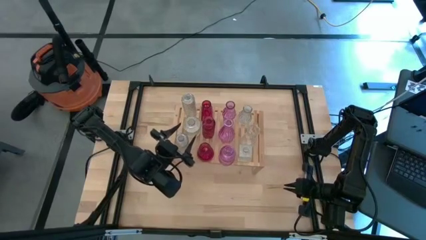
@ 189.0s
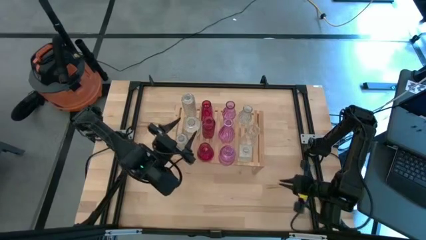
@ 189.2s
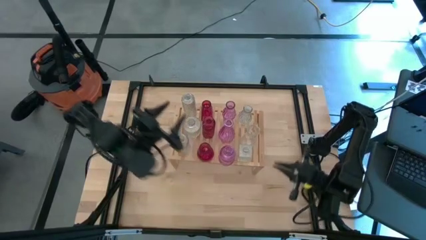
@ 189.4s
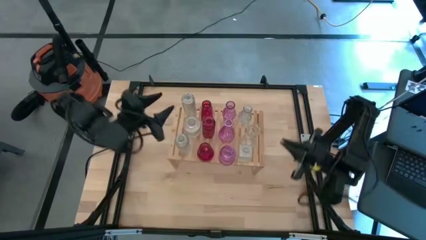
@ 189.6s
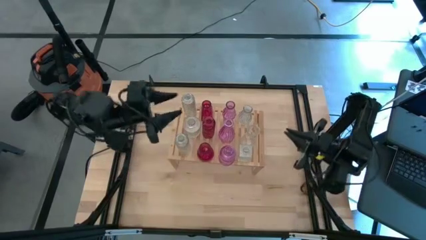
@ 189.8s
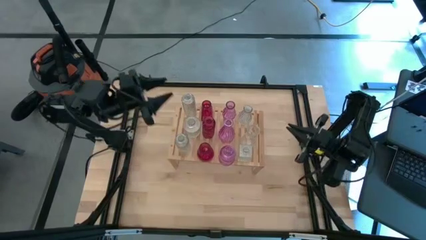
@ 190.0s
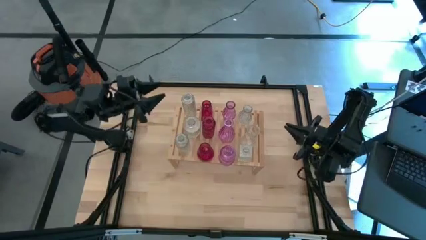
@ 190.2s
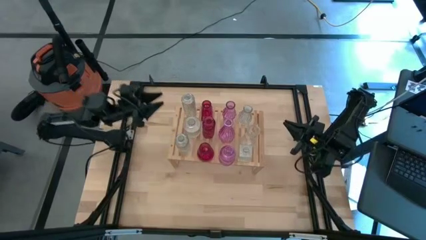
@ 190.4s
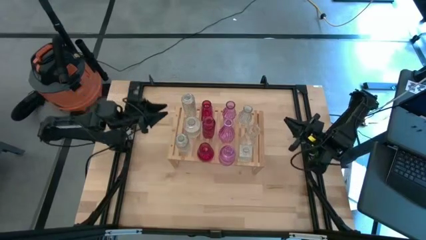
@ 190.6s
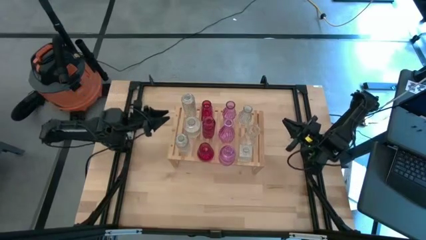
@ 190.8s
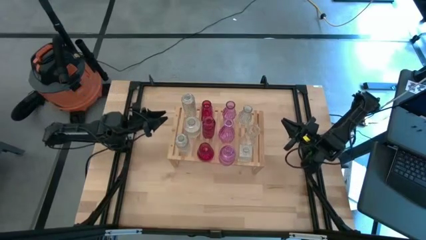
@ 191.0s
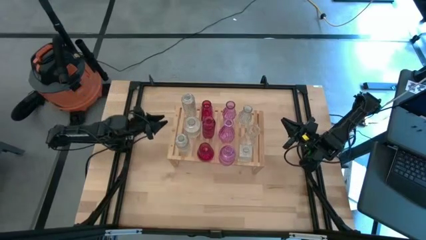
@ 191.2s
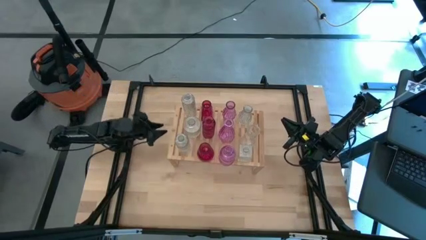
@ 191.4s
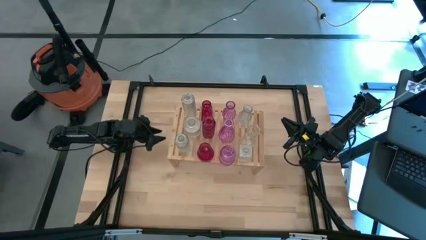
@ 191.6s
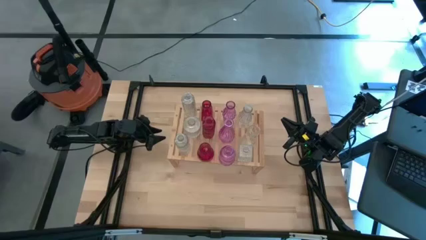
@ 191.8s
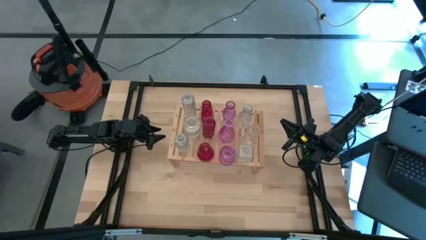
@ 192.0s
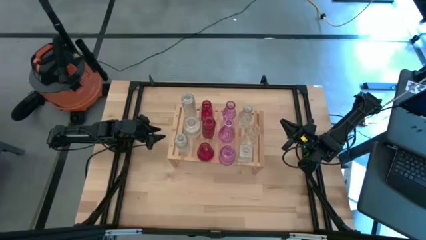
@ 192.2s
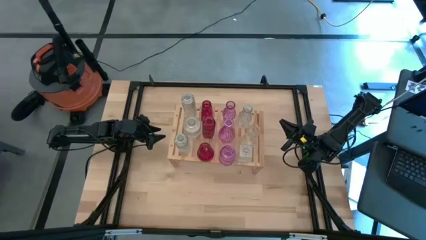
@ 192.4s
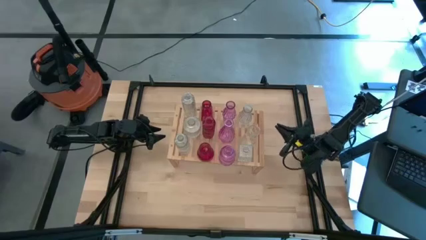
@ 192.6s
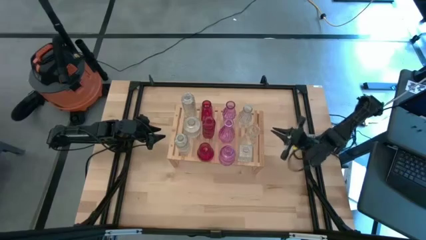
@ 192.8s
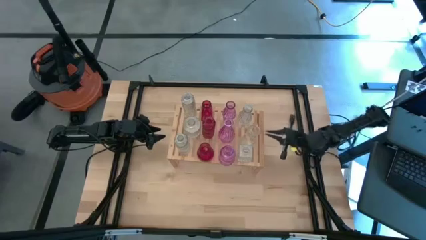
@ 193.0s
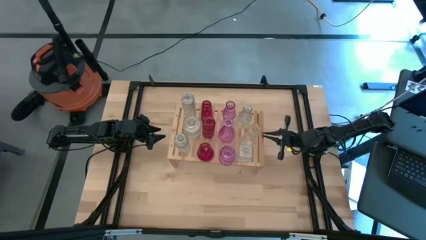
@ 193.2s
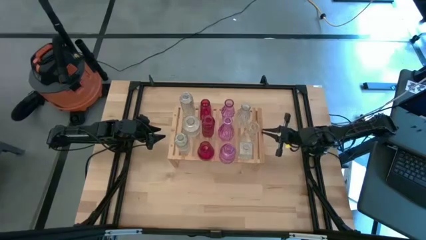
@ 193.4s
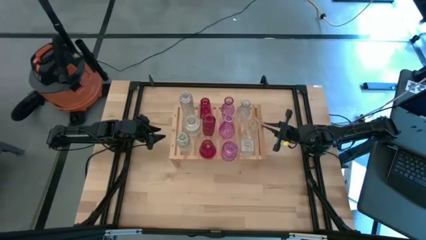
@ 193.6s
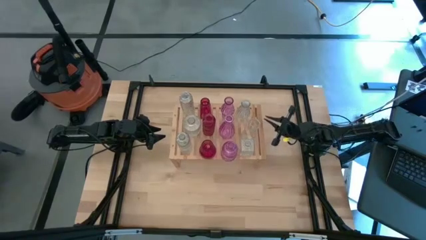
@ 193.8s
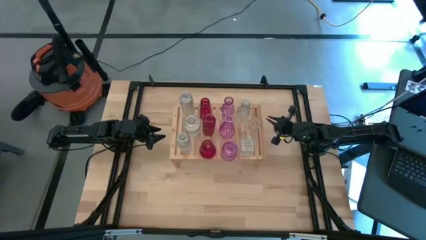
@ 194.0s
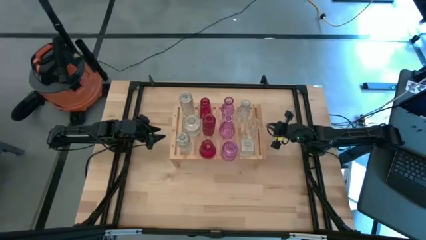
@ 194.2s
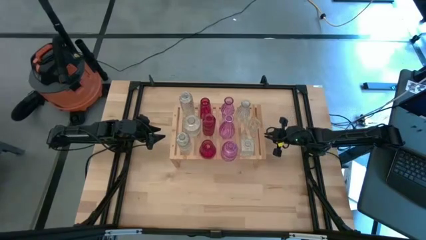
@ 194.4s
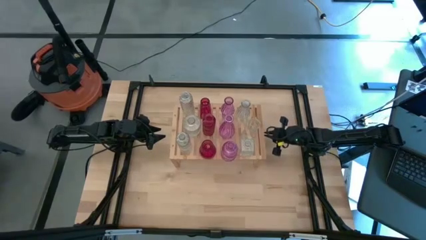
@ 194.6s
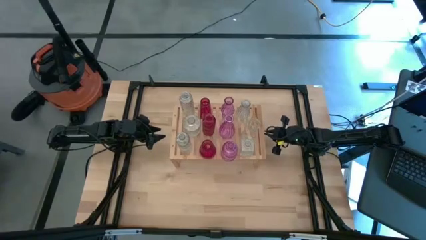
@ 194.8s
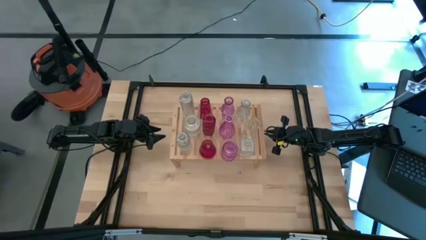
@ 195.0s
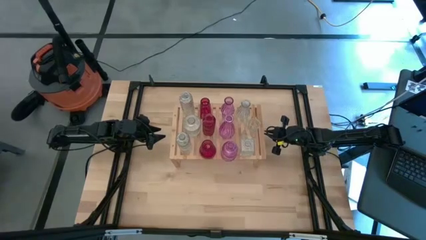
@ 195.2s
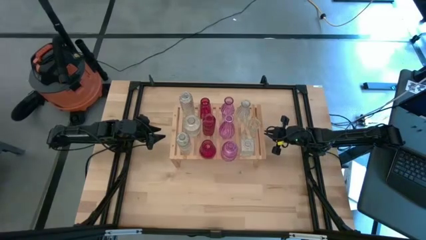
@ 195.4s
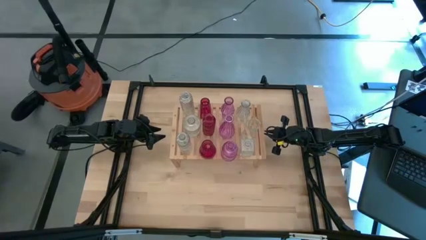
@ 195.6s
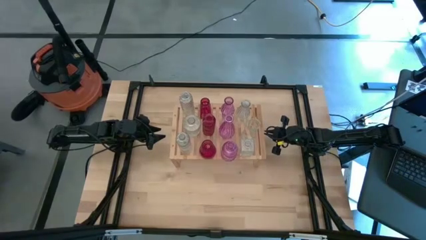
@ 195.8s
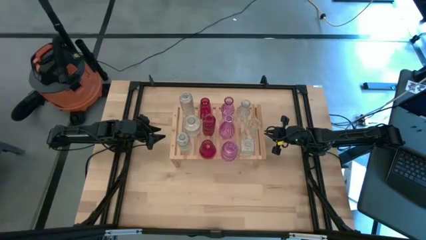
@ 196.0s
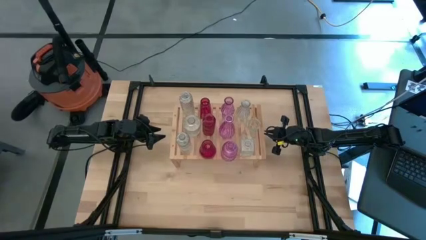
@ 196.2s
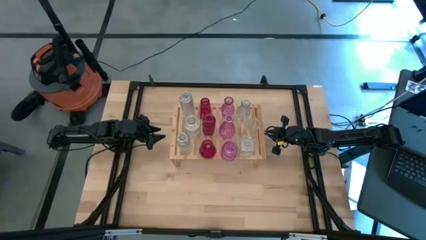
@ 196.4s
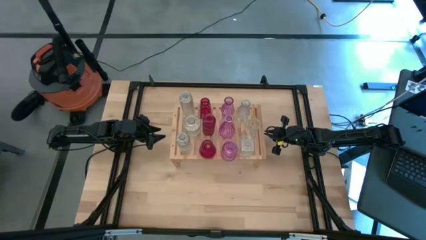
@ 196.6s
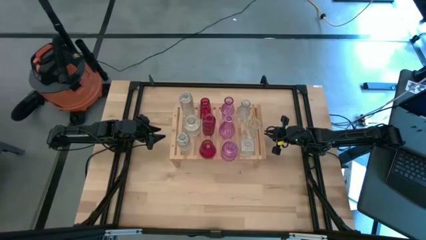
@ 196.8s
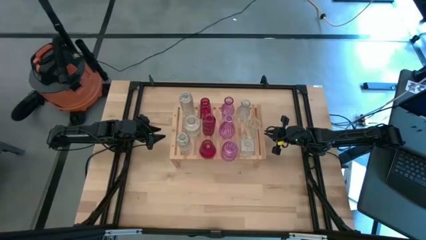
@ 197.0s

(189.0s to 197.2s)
Task: sort vases onto shelf
Return to Home Position

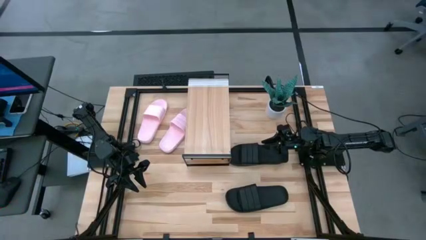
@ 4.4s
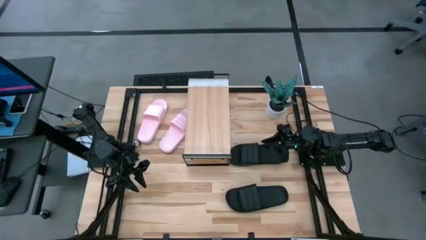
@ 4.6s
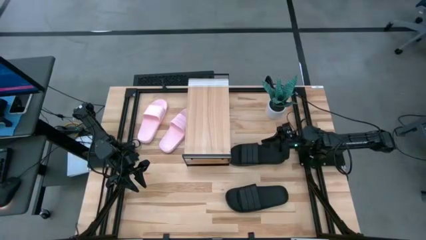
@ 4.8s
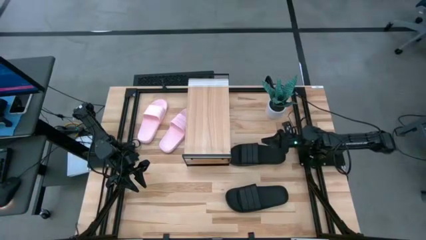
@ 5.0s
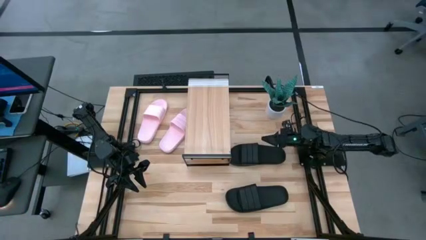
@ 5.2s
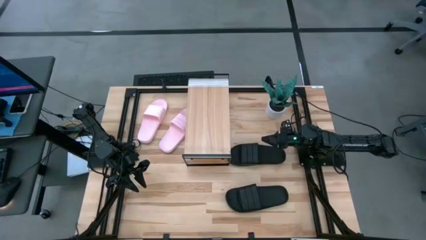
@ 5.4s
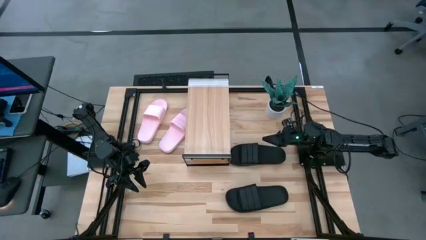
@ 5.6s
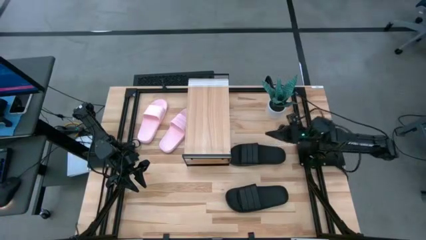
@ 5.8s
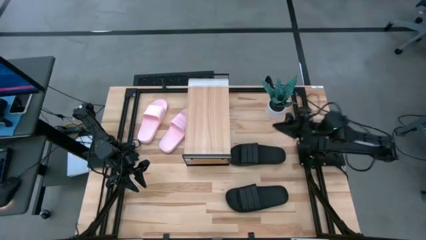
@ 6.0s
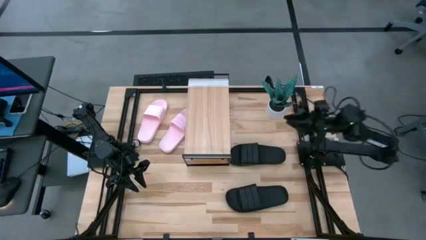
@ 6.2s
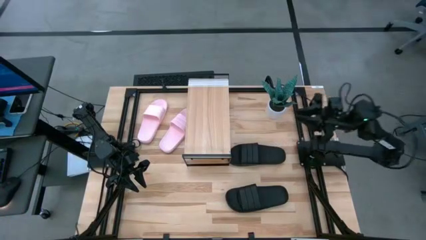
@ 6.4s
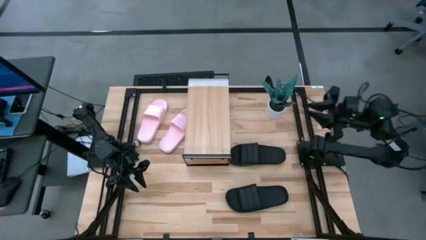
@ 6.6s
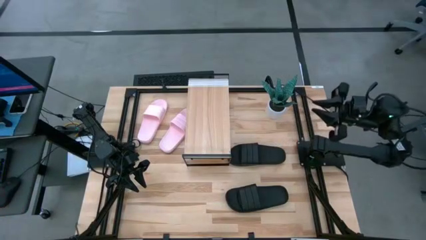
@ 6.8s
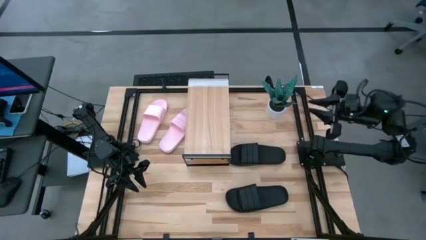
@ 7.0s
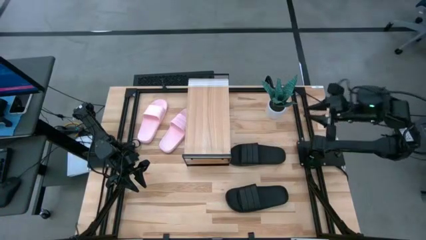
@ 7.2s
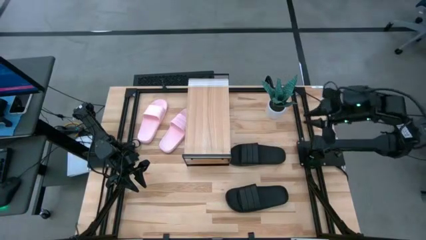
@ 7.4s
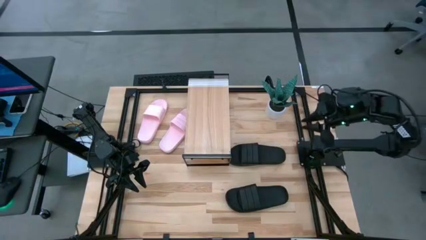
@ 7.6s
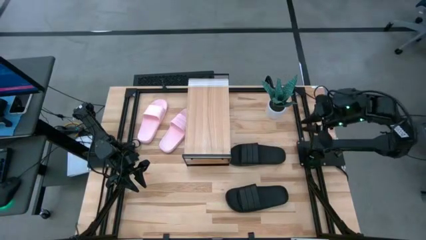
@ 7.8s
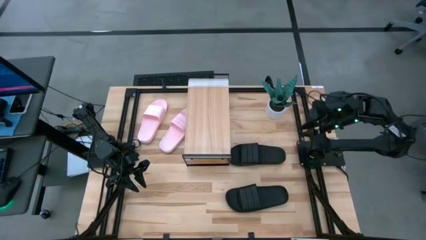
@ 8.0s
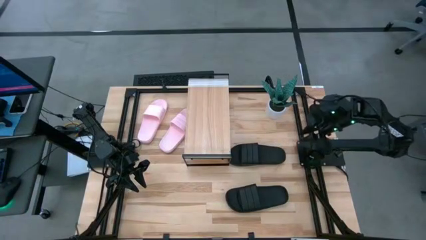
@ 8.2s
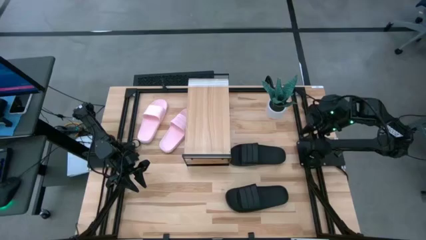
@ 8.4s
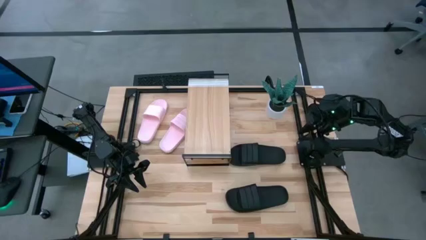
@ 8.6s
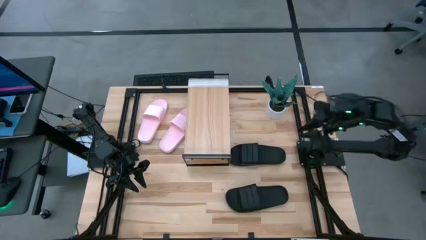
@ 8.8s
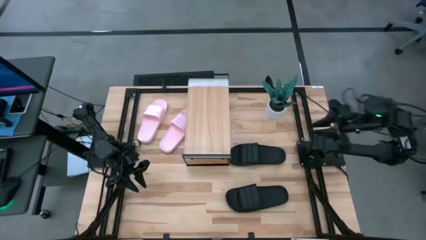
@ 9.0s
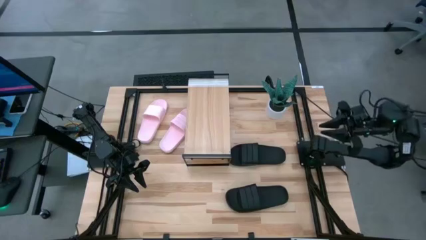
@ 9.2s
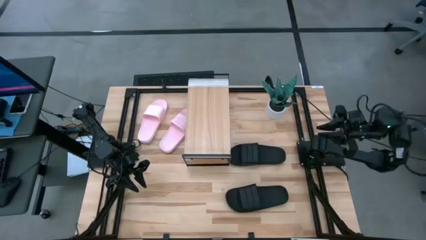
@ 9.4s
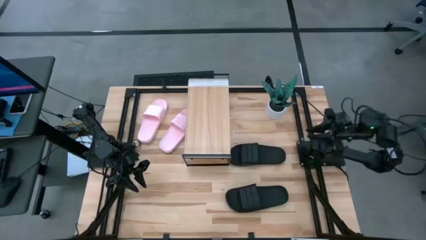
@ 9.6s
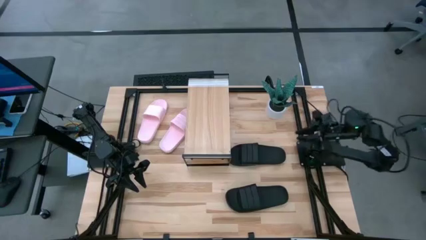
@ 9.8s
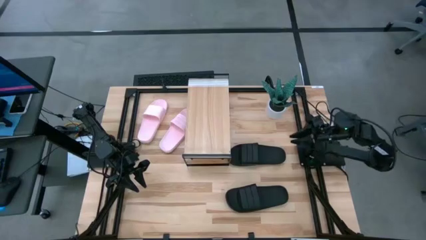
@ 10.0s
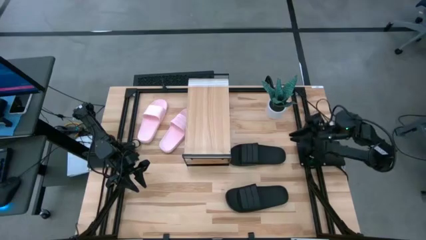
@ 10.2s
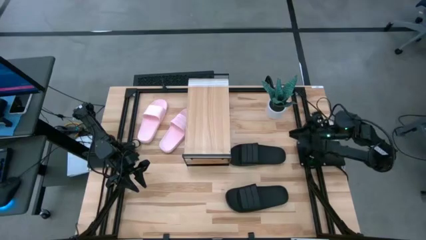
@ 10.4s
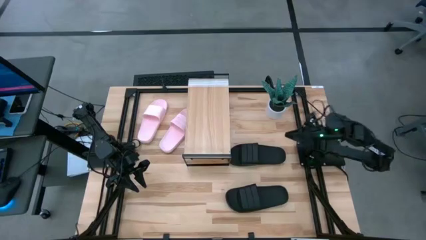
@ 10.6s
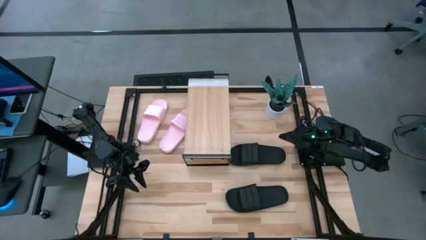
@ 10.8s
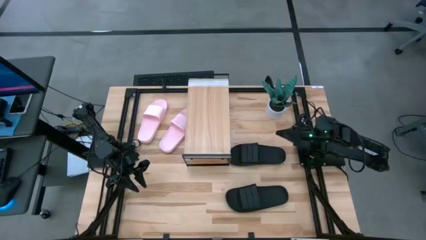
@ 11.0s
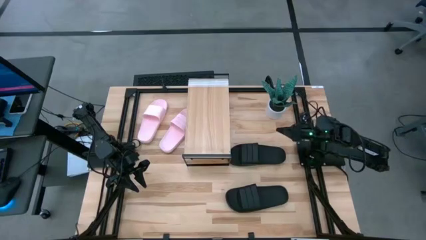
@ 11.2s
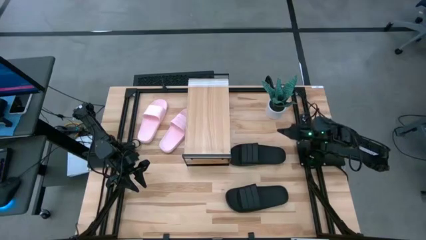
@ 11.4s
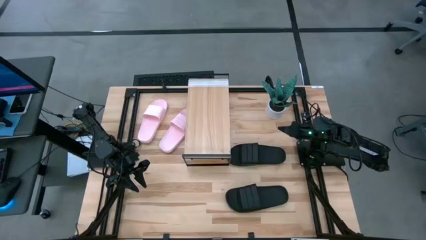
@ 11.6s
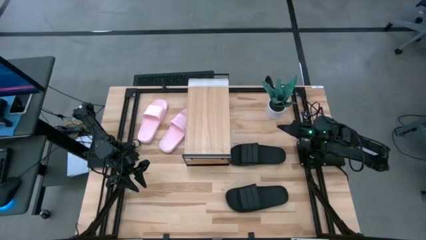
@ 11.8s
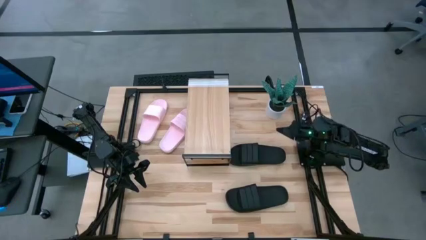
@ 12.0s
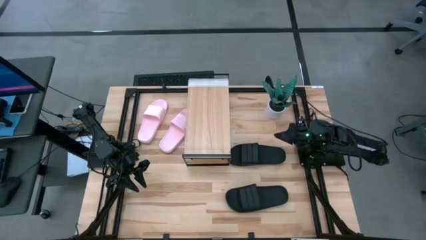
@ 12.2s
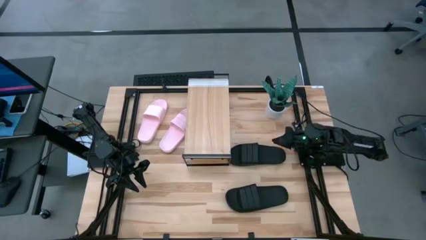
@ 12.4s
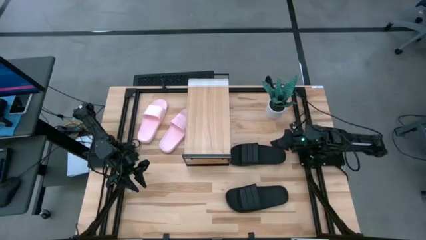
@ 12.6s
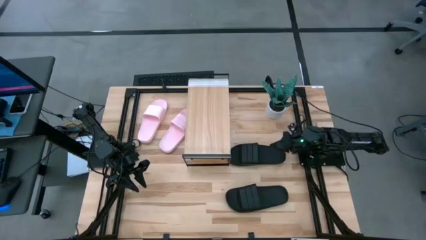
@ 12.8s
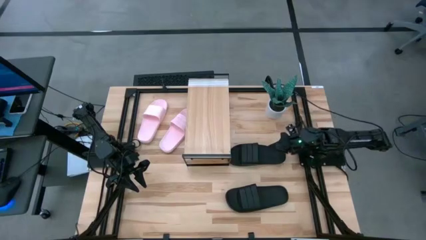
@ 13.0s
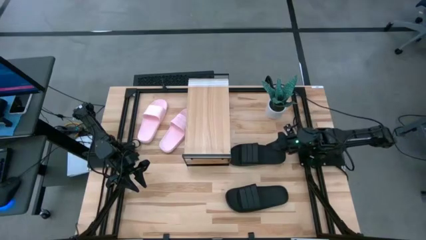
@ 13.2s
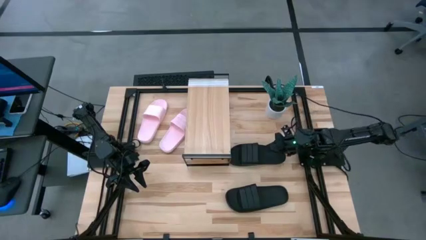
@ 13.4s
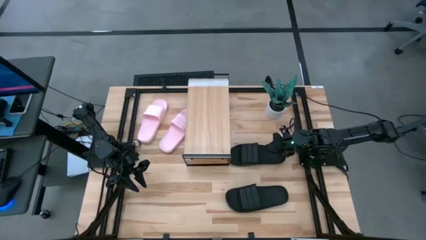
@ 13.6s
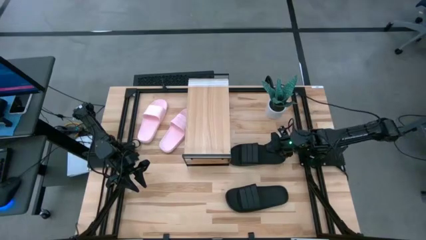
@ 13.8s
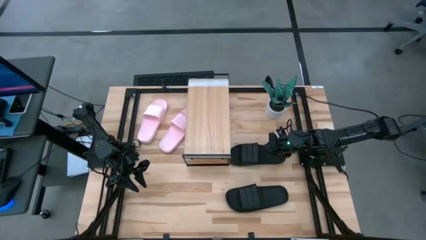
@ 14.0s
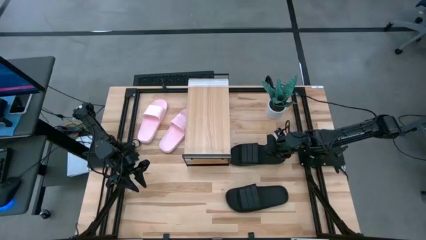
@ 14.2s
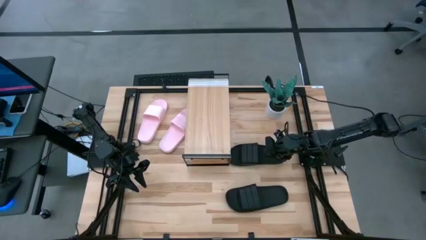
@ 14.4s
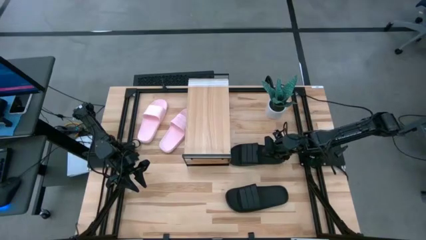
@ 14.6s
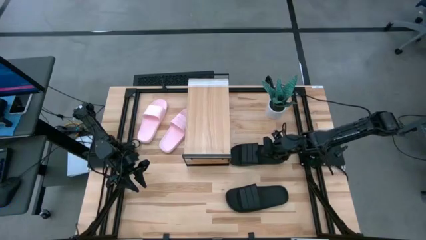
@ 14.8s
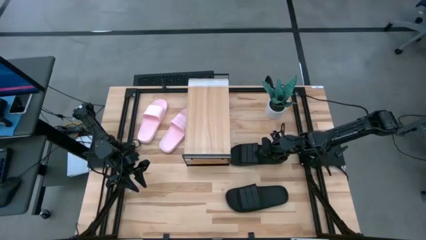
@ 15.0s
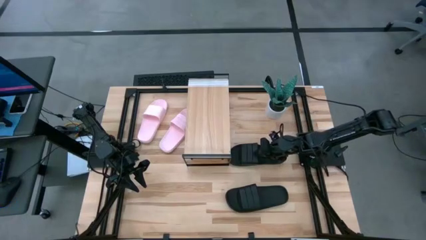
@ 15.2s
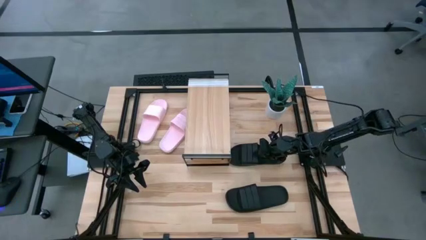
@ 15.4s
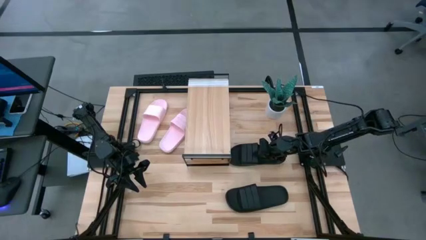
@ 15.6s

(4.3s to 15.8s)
Task: Pick and place slides into the shelf
Put the top black slide on the shelf
